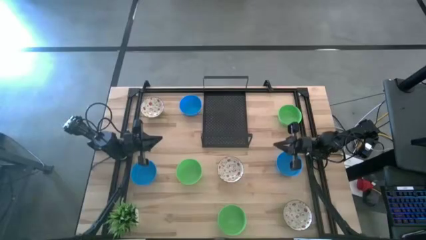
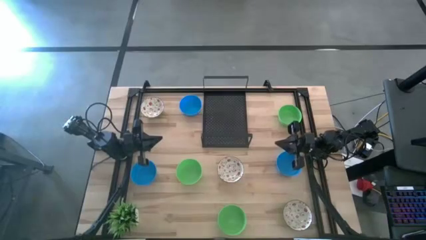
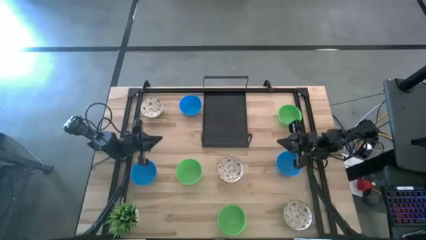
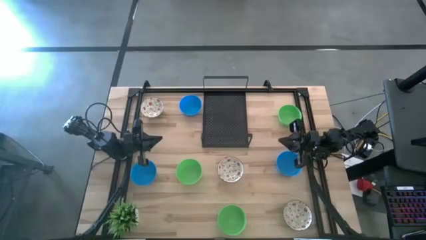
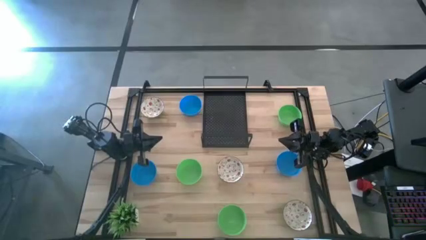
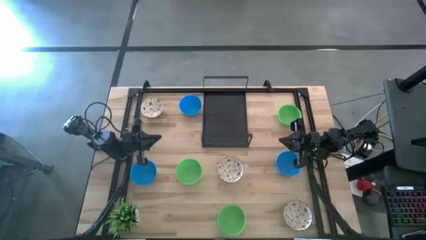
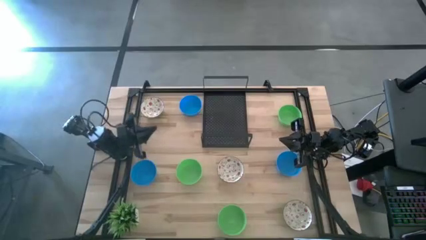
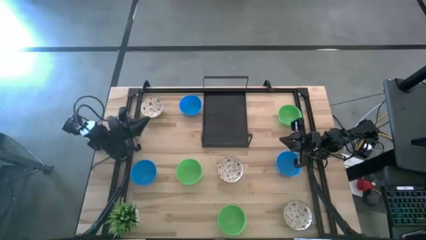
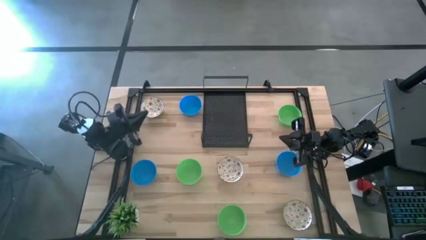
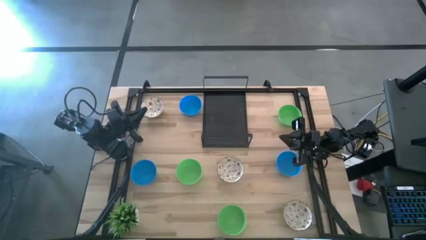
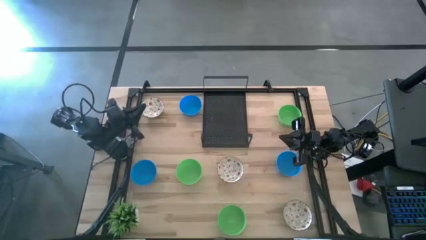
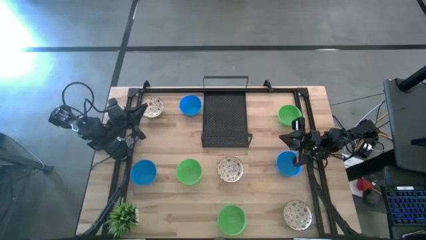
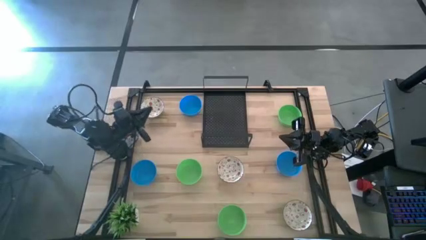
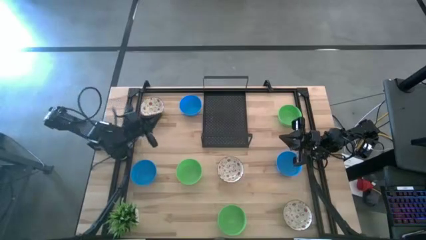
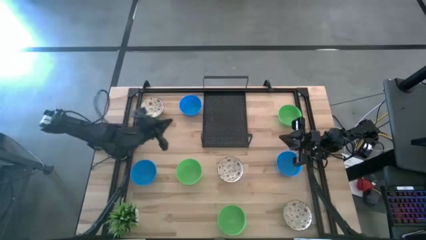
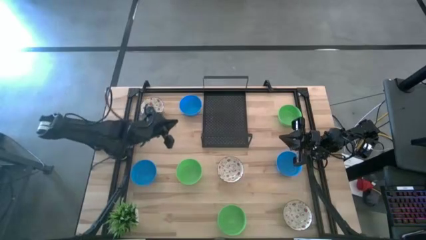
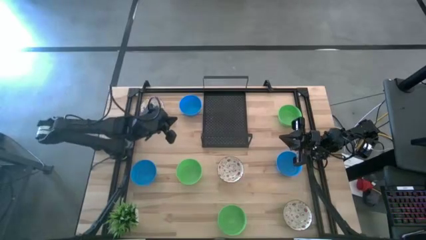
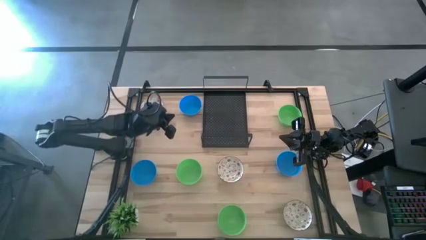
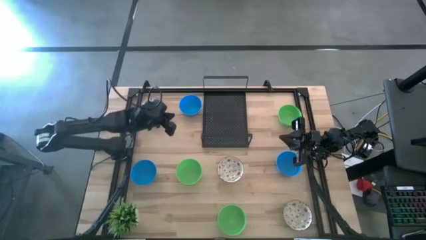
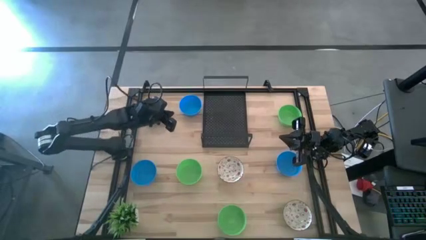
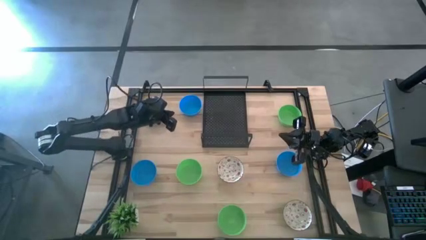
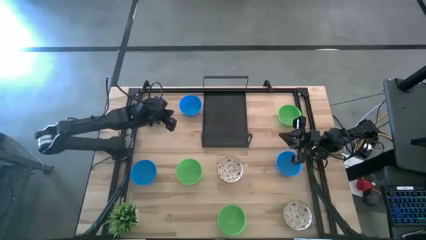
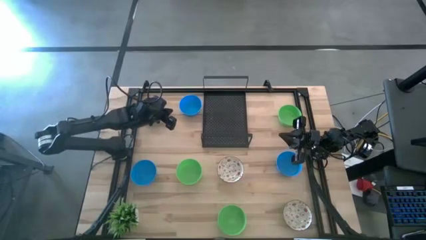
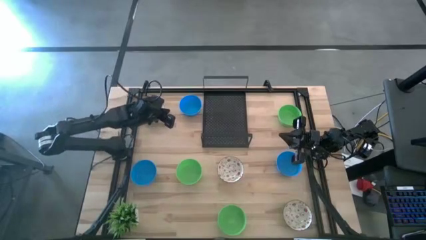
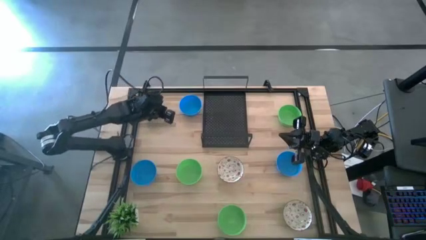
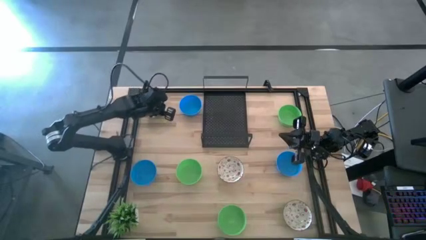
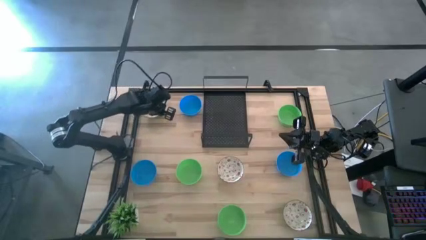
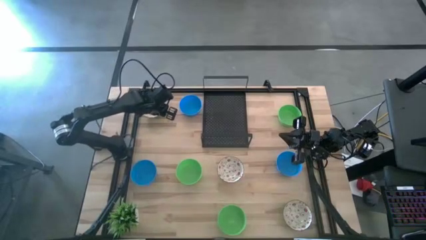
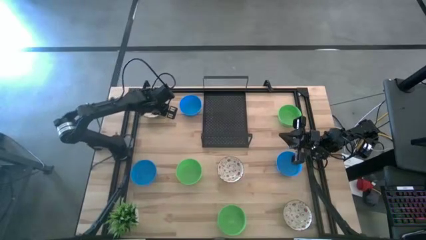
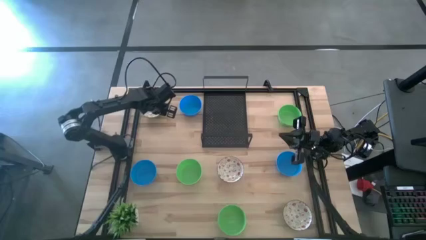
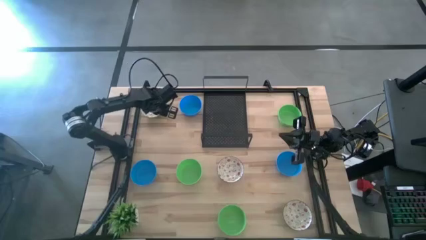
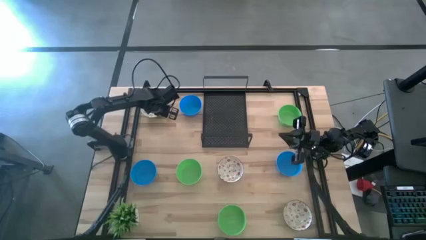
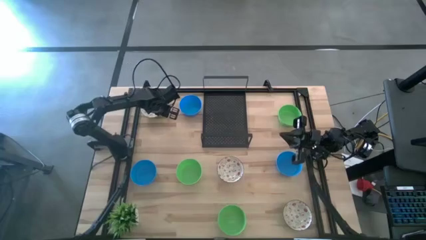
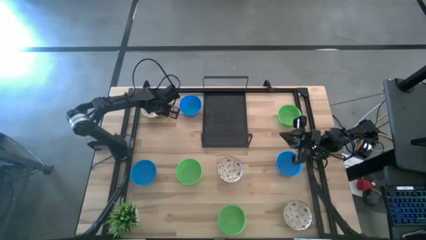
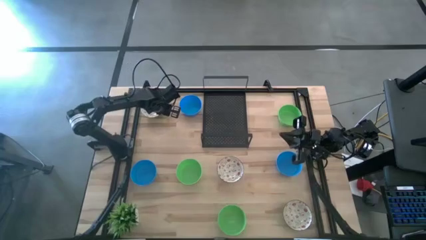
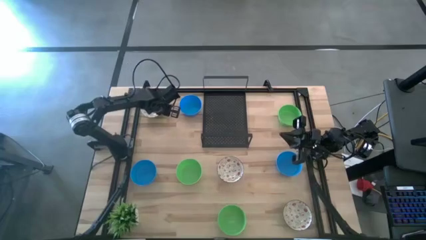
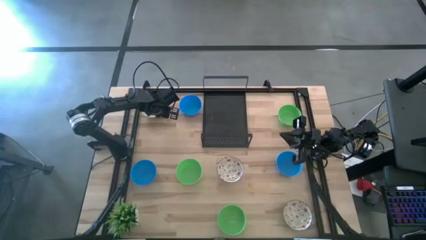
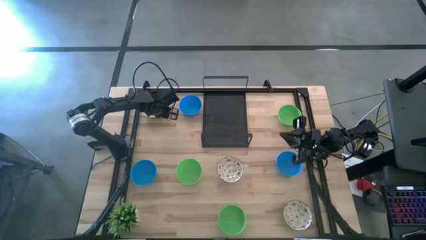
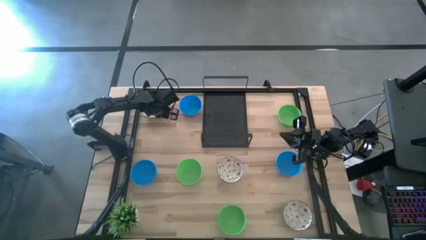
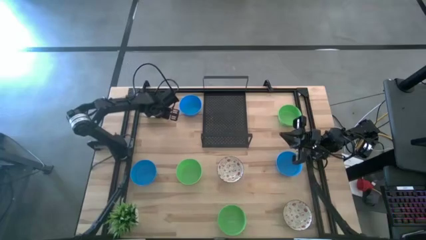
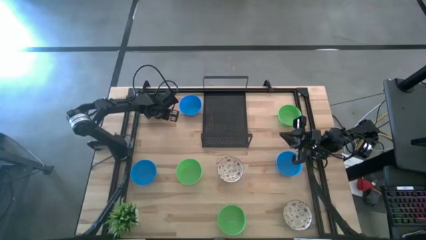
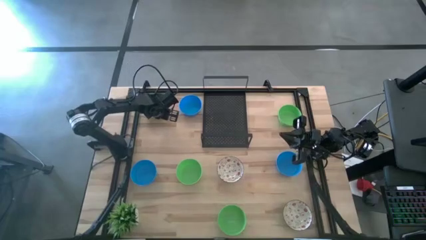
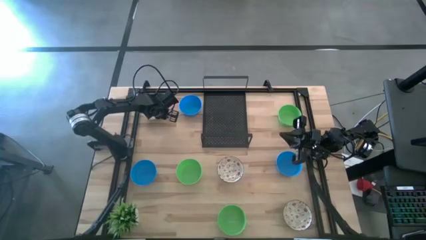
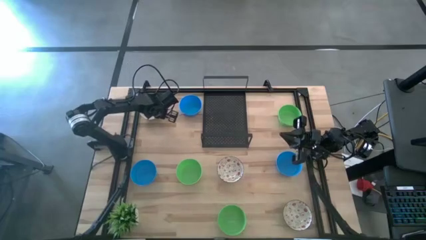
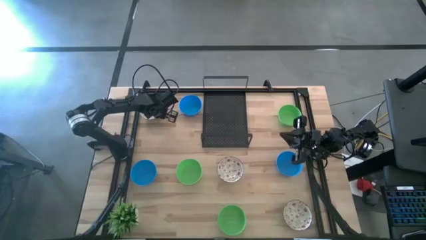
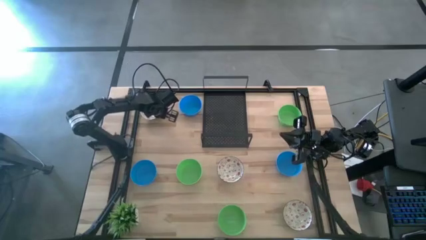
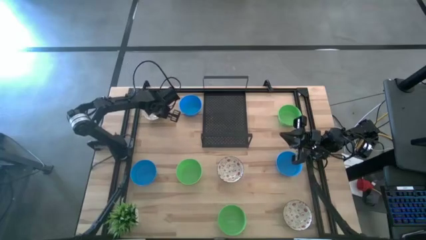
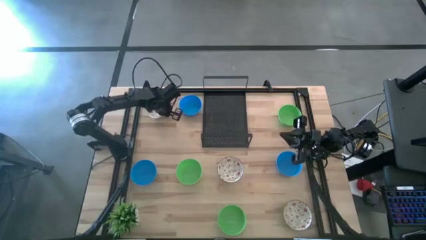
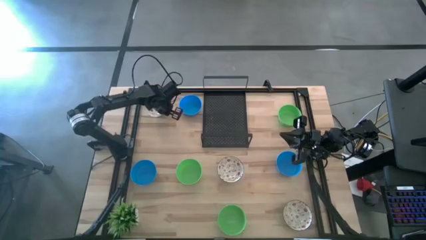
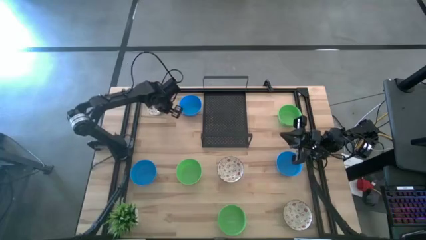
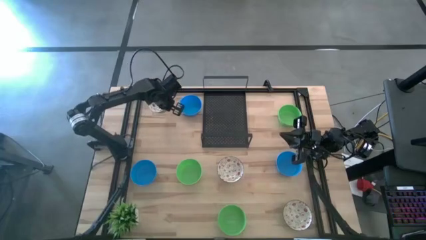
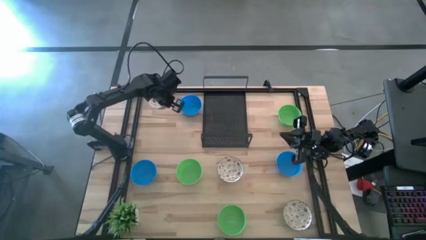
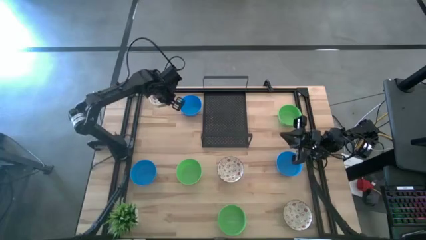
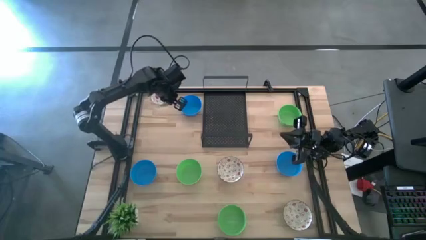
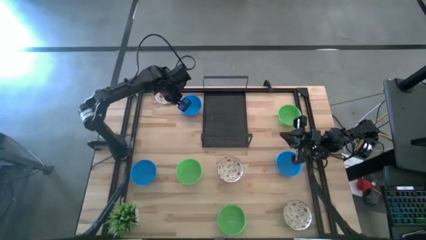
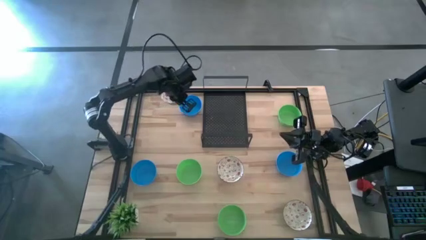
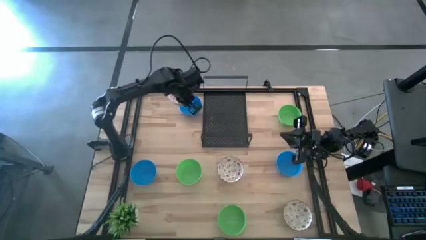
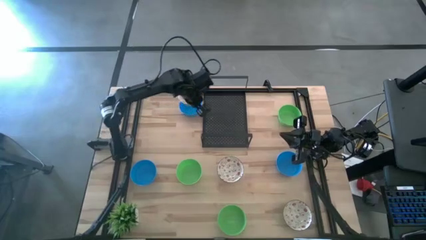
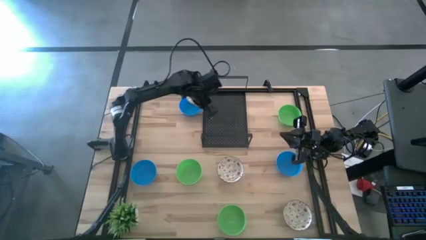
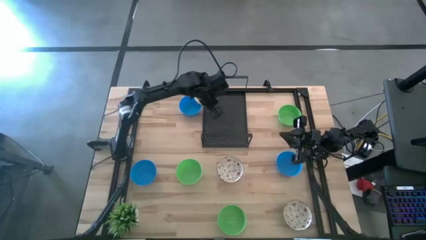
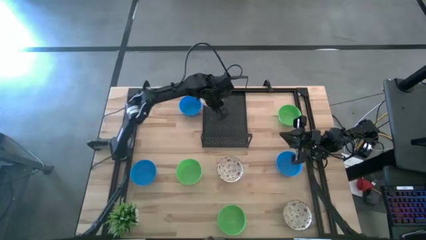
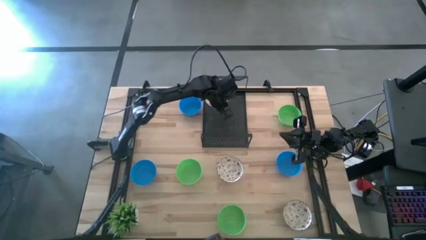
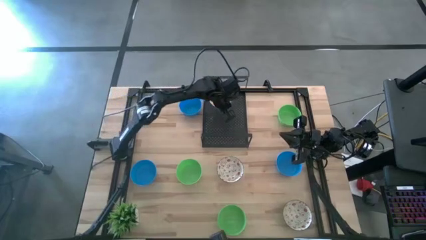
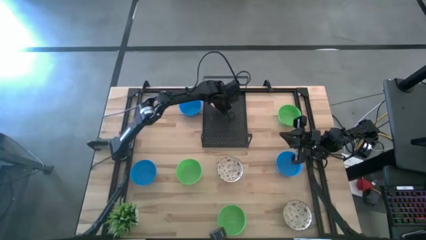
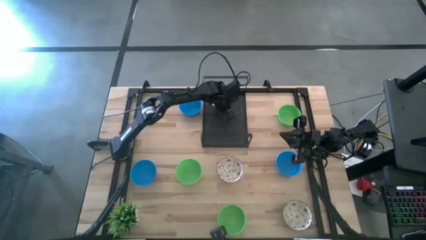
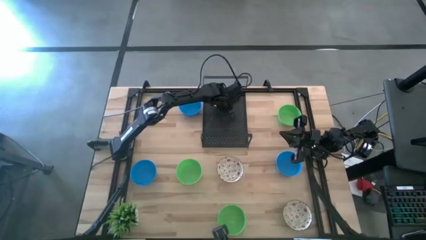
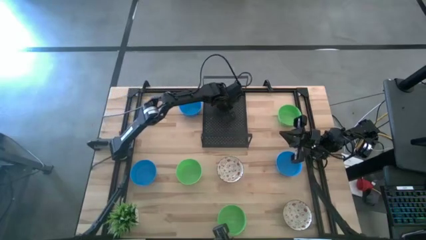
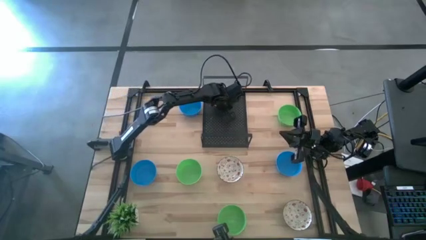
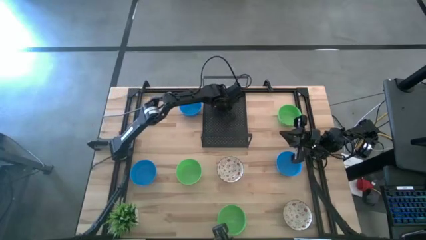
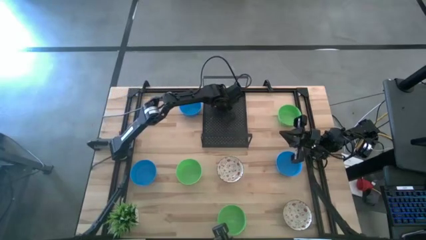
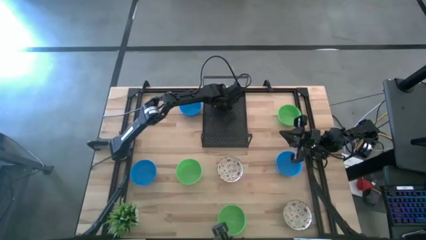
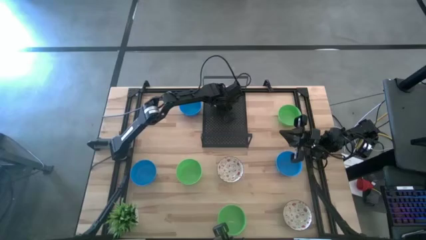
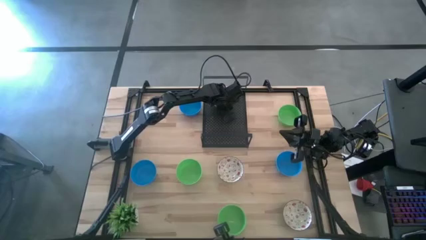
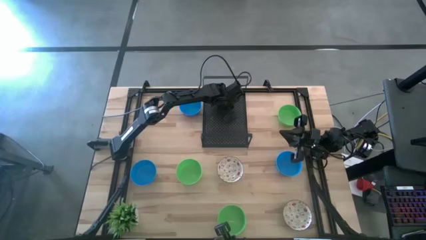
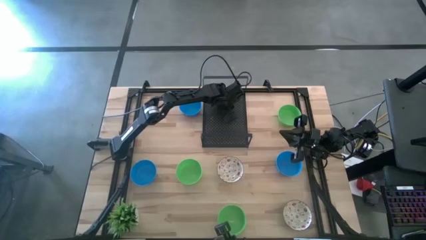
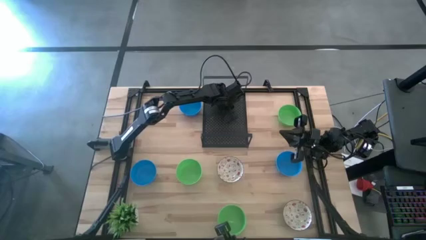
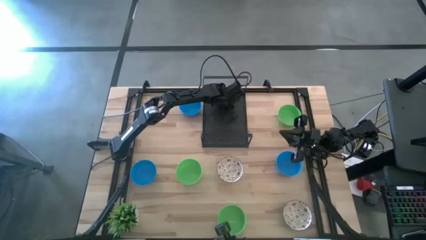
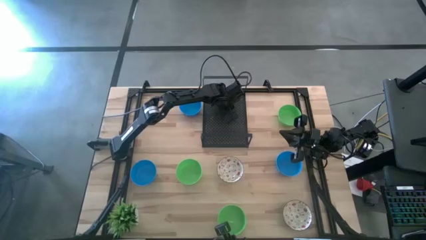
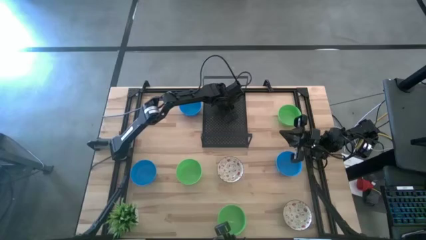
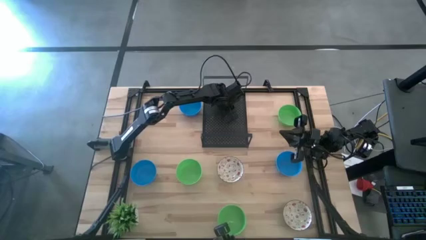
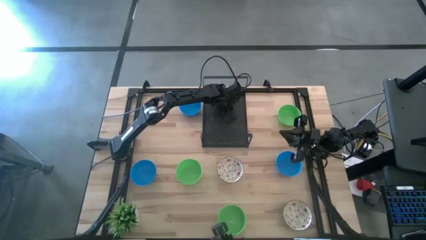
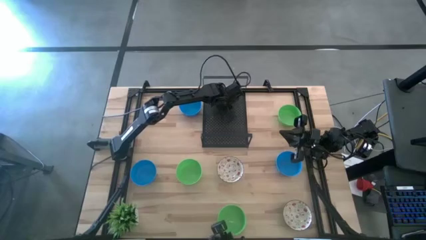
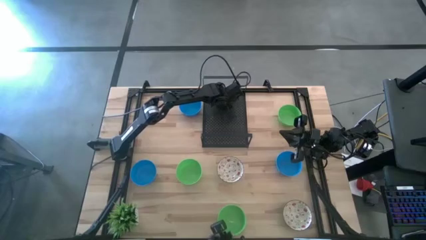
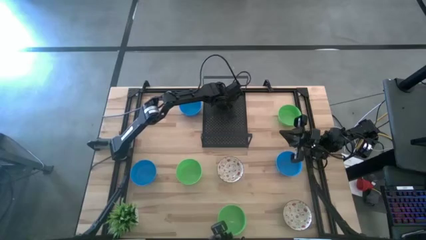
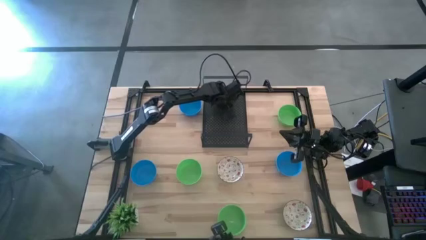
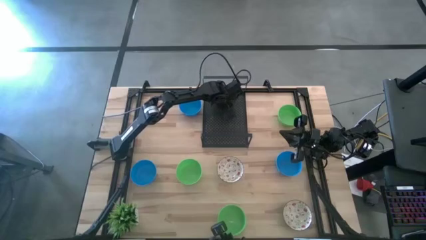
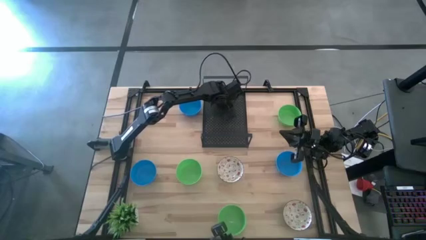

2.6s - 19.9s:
Task: Pick & Place Mini bowls
Put the top white bowl on the shelf
